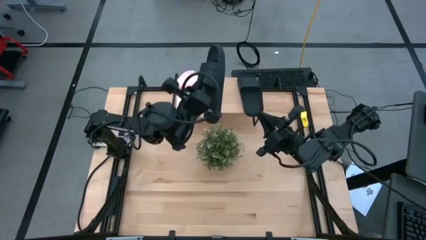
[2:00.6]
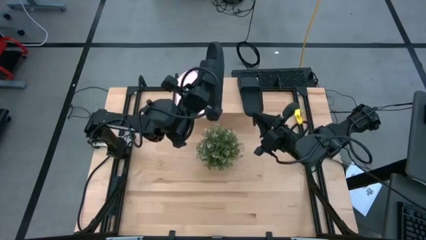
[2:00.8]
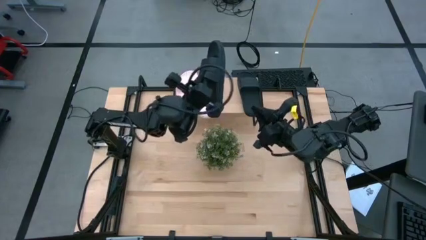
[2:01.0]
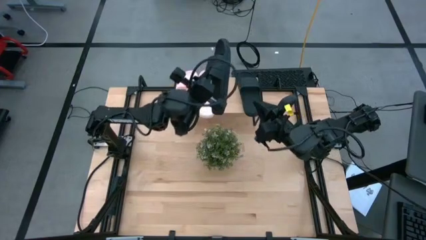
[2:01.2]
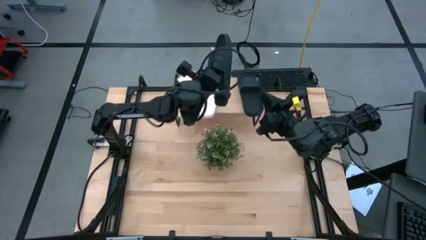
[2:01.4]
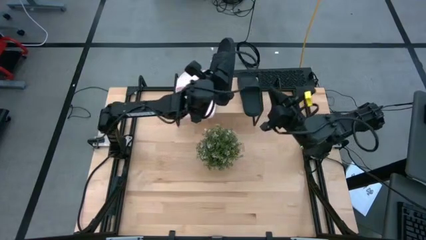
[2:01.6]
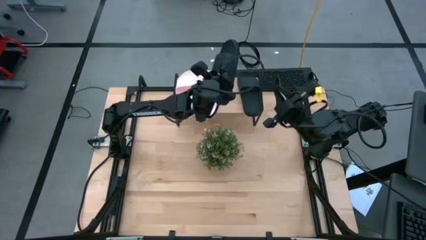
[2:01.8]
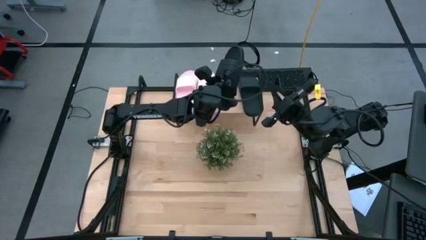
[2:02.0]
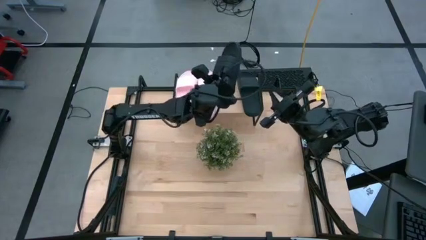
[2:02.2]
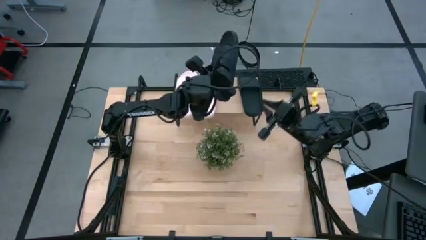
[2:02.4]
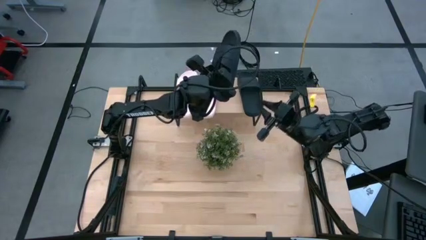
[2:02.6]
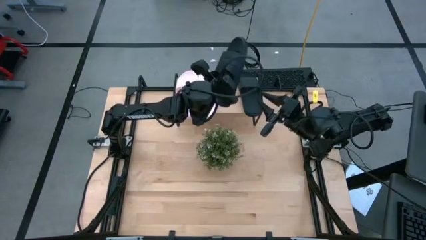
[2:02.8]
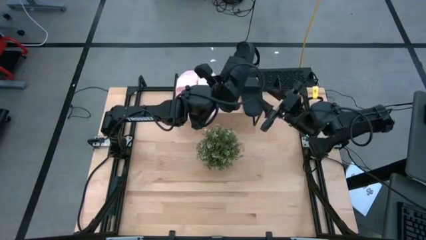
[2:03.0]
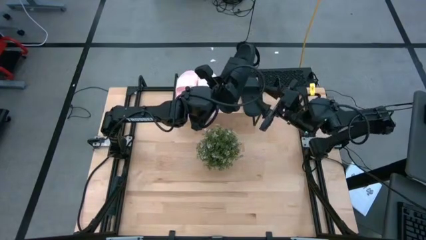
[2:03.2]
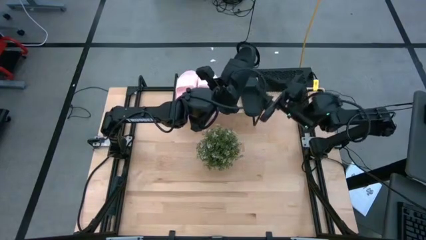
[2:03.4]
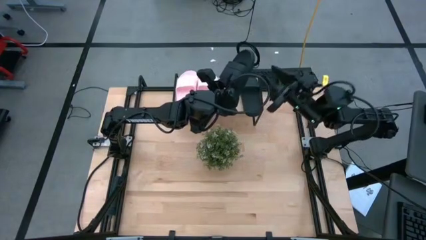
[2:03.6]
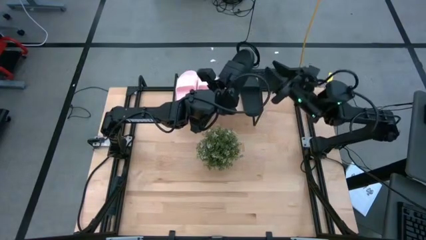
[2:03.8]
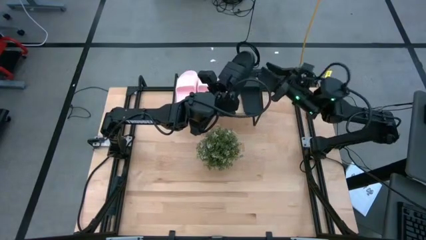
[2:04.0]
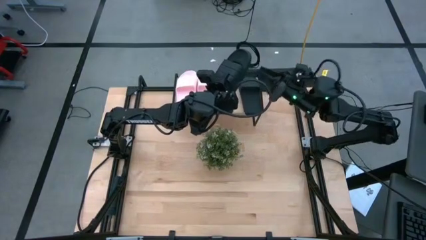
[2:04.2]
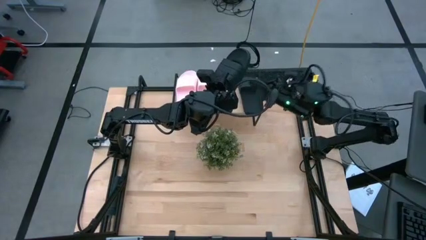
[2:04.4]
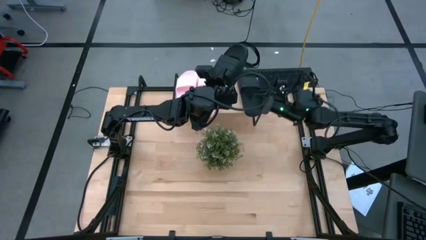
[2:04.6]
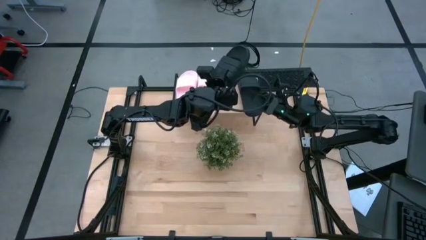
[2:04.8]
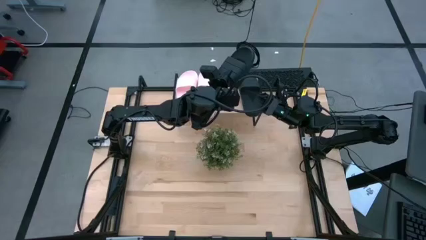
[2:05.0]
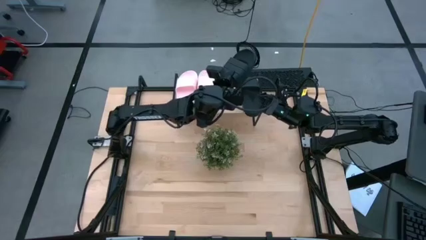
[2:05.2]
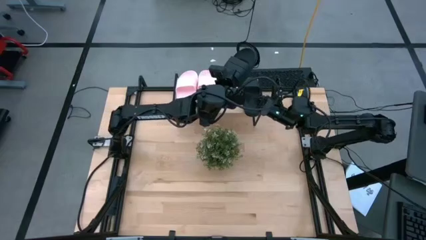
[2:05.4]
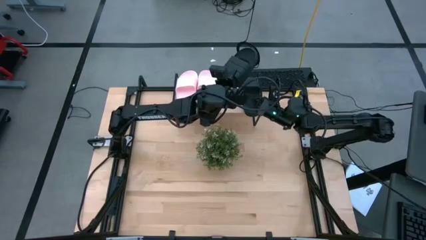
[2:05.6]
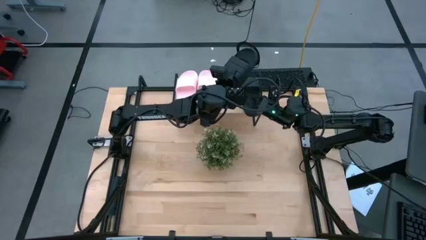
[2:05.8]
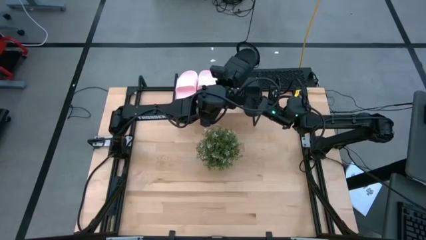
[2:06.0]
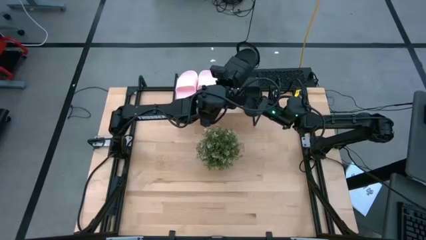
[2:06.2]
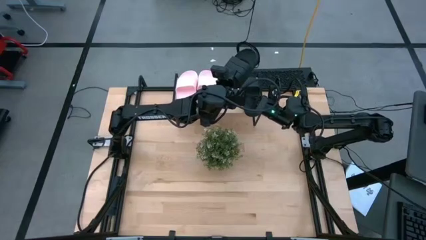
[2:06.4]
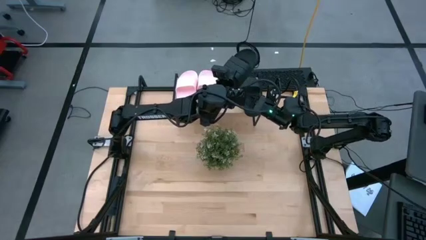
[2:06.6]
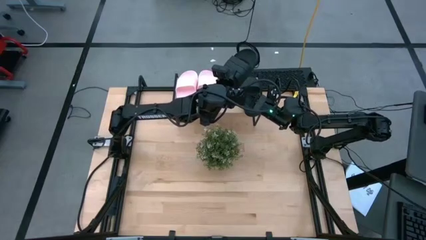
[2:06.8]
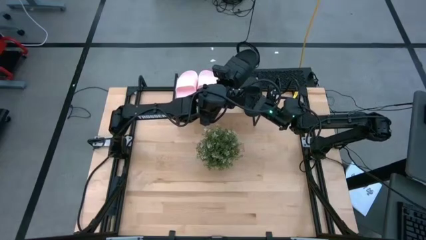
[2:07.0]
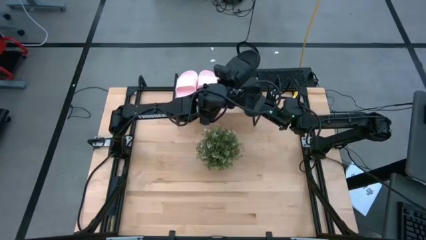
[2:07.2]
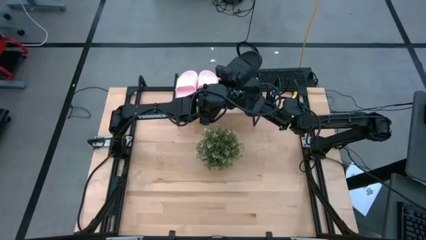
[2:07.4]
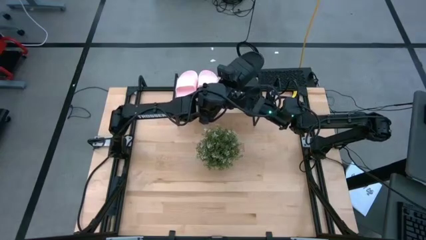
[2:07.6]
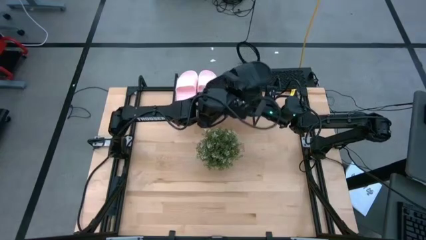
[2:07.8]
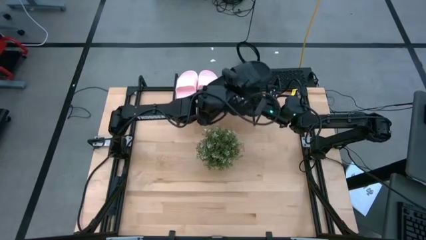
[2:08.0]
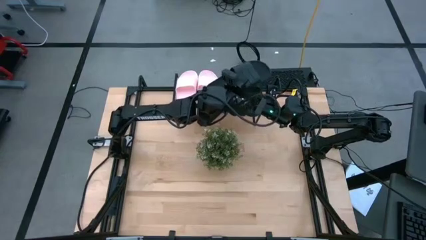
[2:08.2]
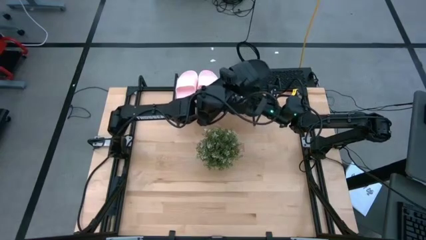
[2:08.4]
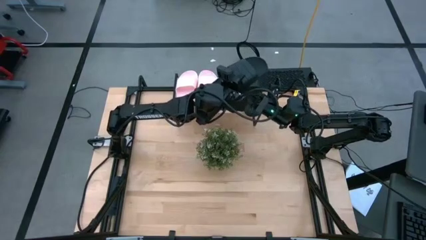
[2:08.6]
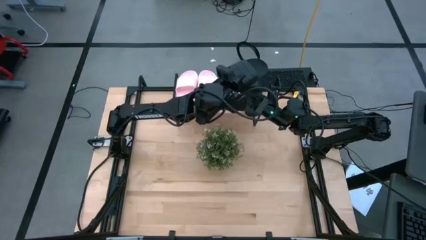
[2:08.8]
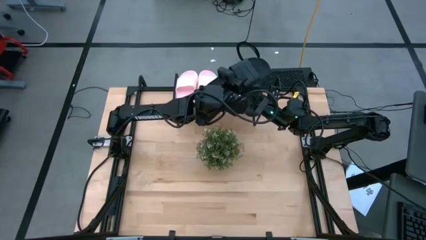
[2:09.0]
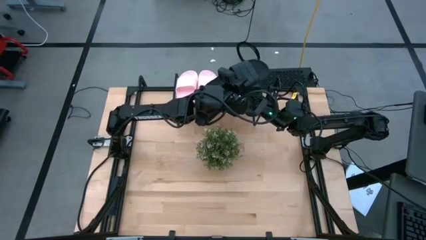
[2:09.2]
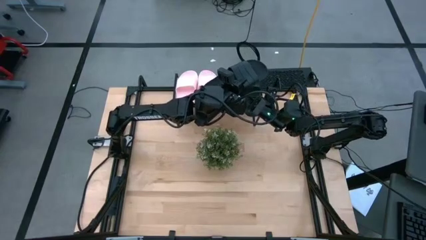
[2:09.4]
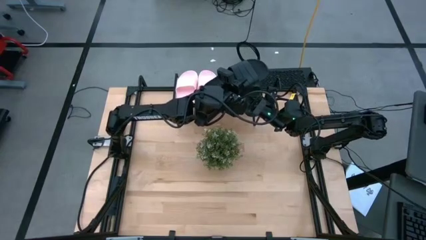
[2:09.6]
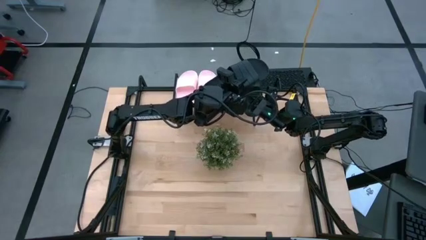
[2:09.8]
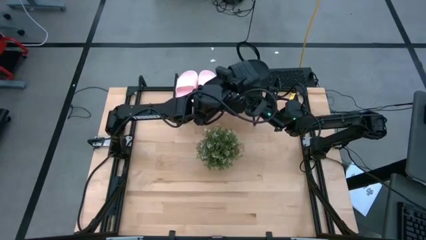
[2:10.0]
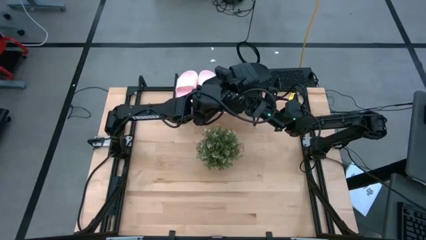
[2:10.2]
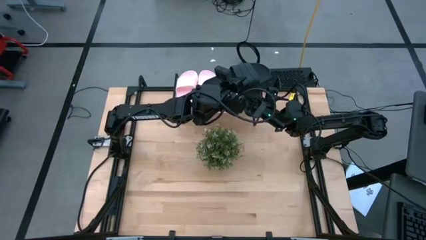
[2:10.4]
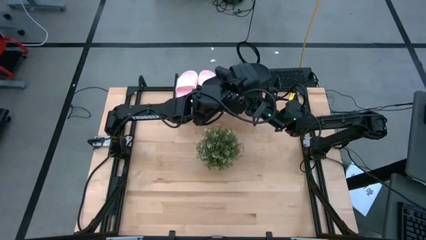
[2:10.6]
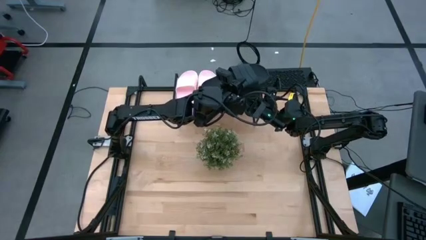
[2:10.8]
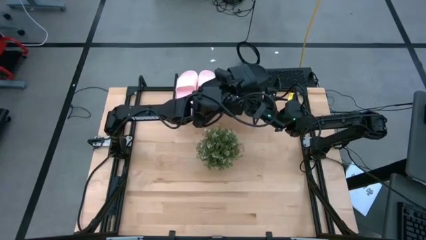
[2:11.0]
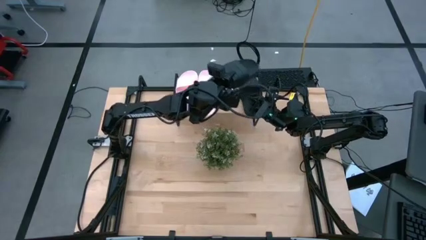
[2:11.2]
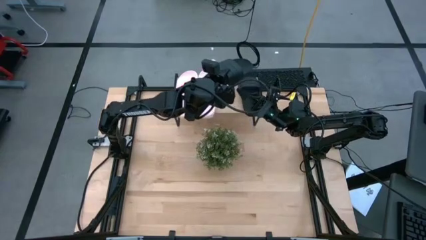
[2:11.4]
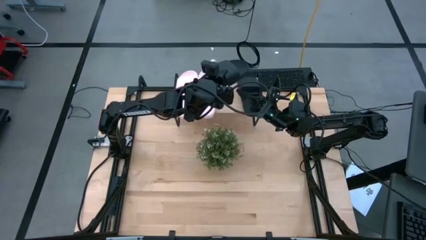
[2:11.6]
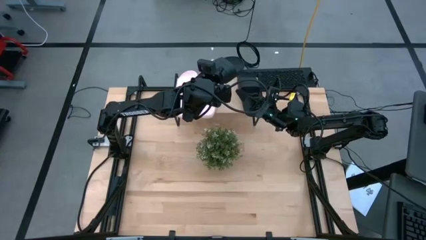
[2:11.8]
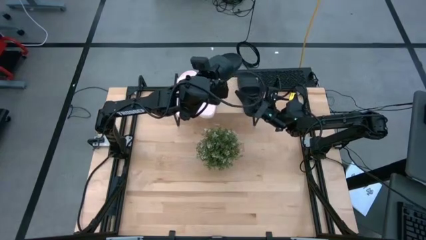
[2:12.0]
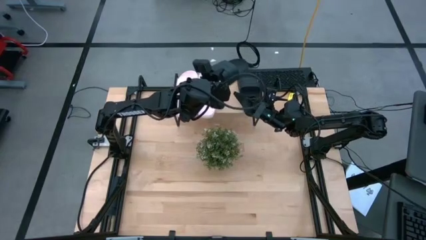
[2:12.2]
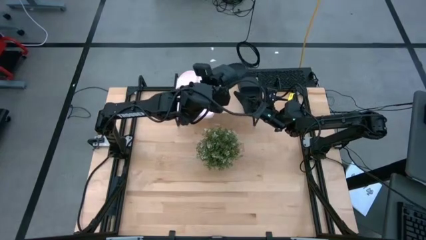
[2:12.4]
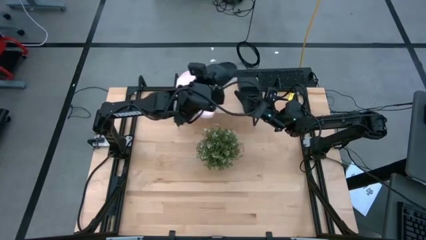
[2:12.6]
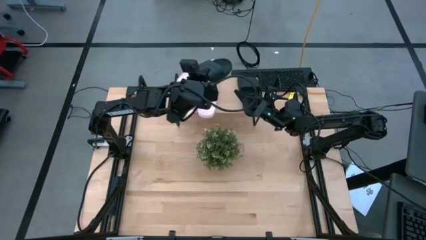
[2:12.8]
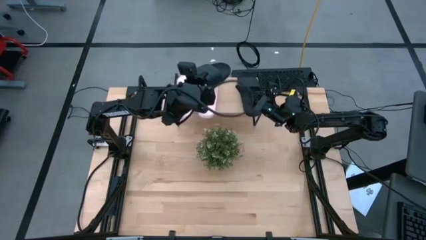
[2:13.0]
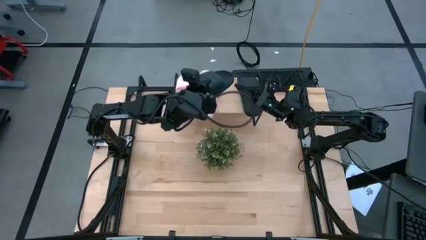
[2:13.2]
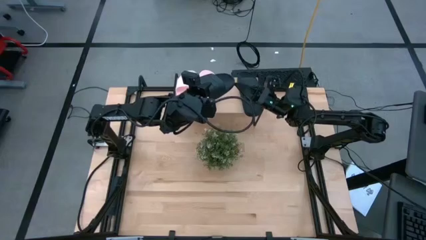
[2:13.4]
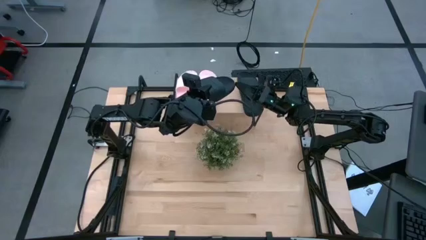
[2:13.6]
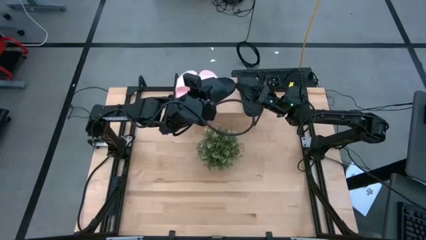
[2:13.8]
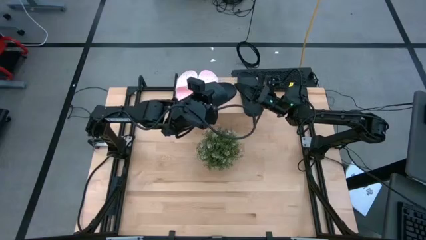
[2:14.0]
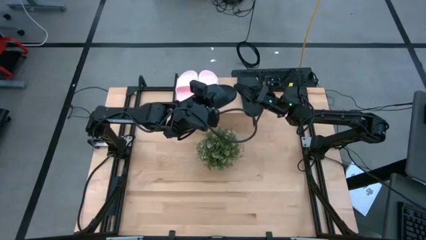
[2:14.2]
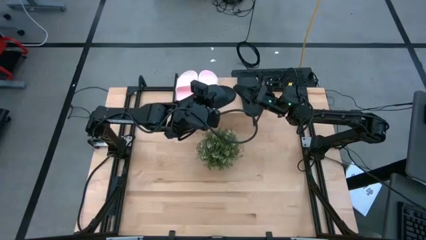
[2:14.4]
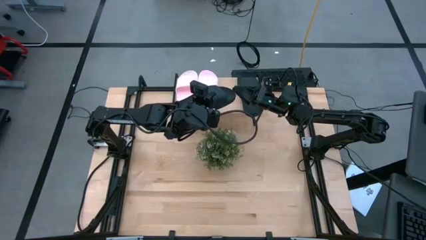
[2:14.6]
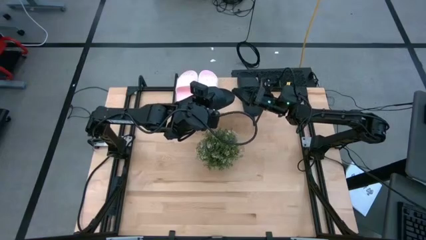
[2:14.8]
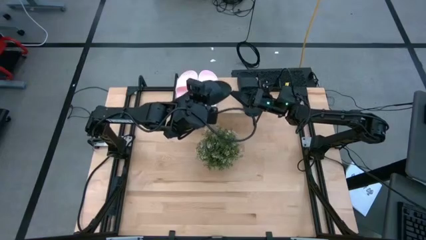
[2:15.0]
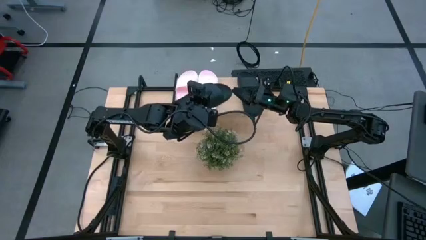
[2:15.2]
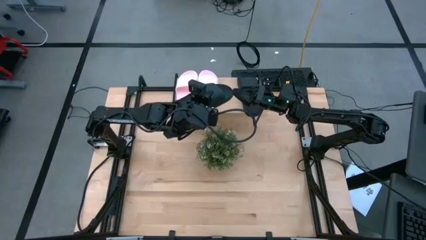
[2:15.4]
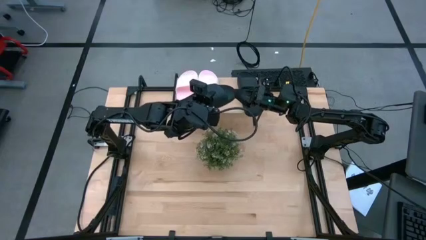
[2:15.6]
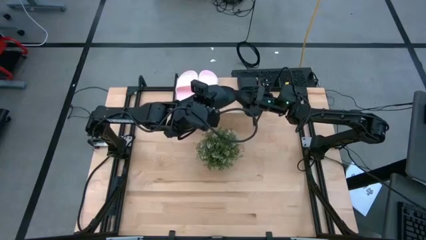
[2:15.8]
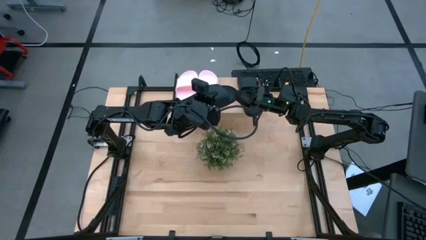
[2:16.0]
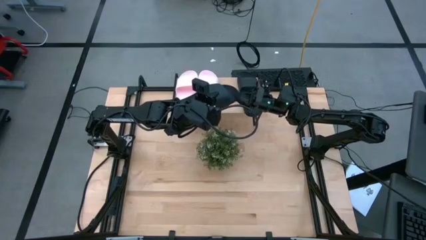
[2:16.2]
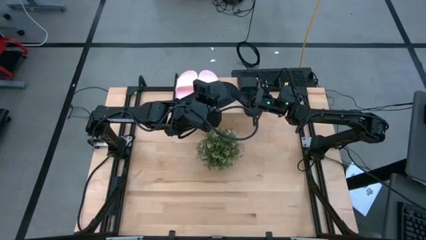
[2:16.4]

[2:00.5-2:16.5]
Task: Pick and place slides into the shelf
Put the black slipper on the shelf
